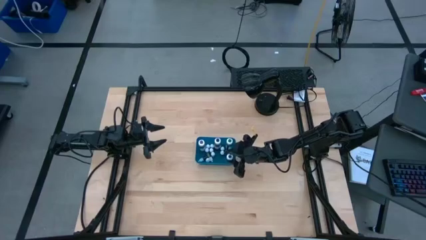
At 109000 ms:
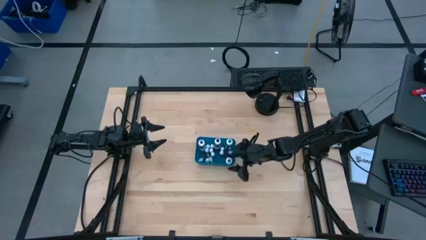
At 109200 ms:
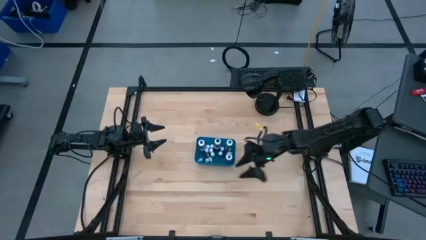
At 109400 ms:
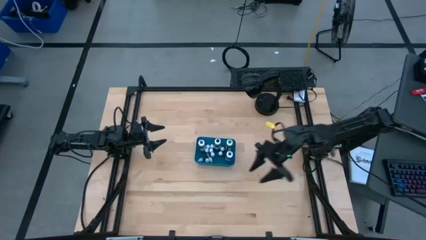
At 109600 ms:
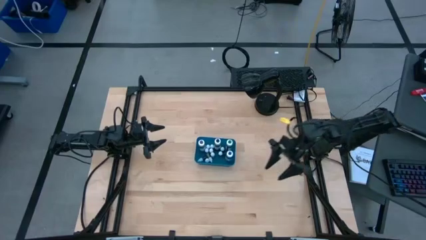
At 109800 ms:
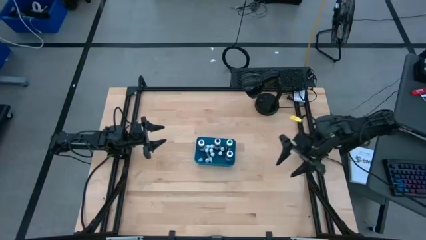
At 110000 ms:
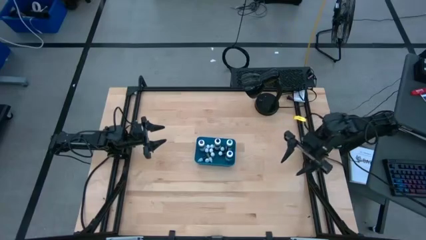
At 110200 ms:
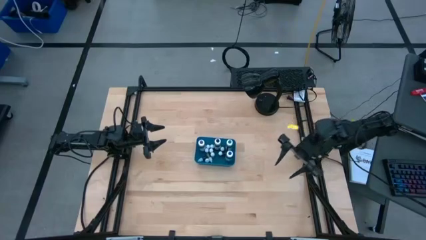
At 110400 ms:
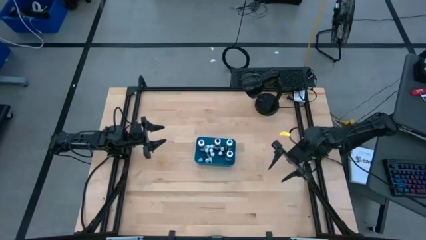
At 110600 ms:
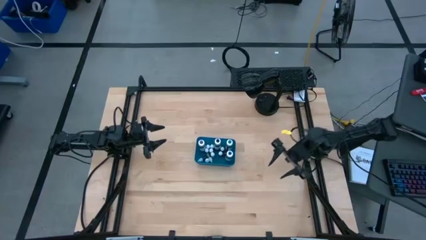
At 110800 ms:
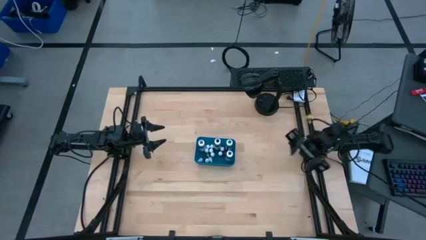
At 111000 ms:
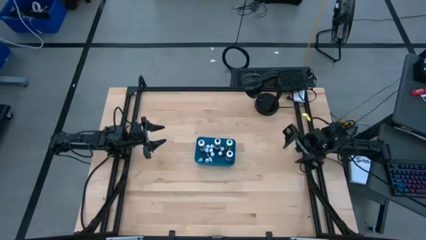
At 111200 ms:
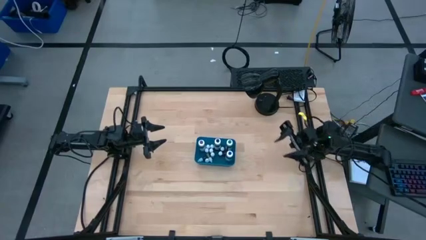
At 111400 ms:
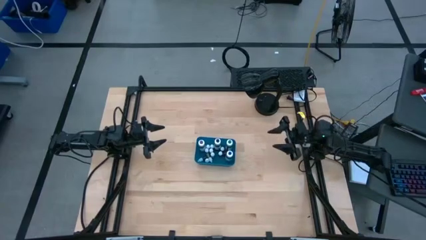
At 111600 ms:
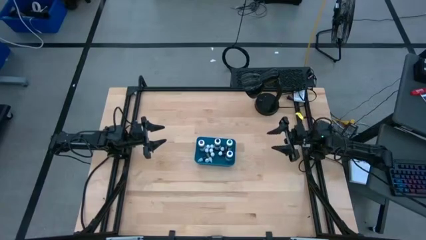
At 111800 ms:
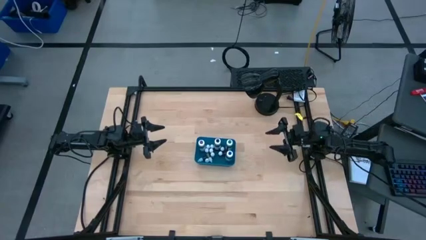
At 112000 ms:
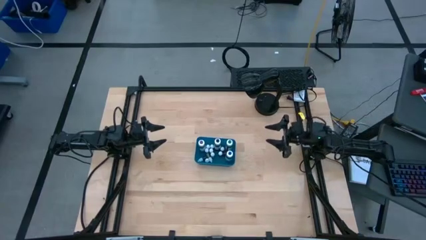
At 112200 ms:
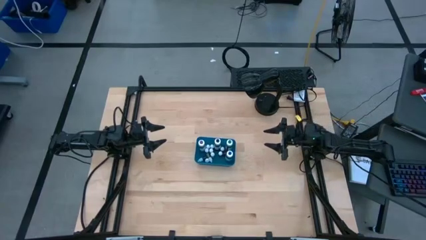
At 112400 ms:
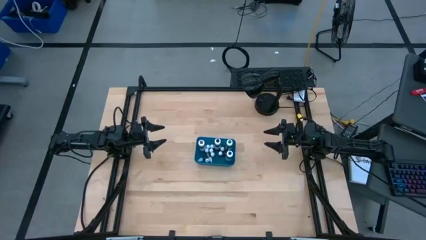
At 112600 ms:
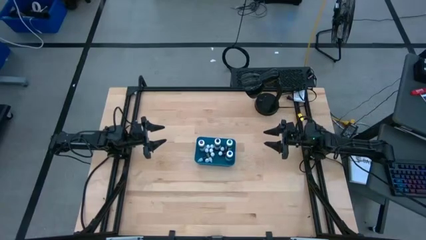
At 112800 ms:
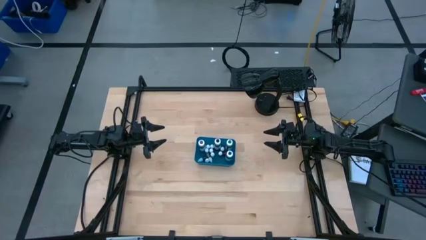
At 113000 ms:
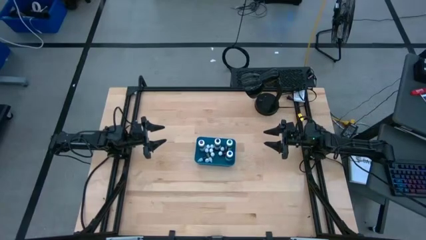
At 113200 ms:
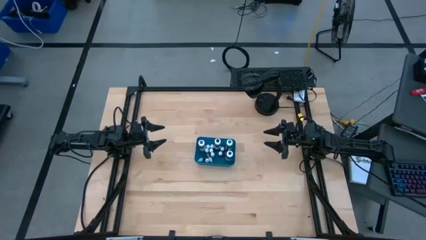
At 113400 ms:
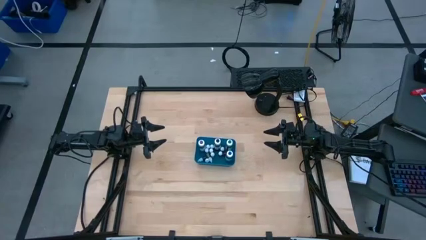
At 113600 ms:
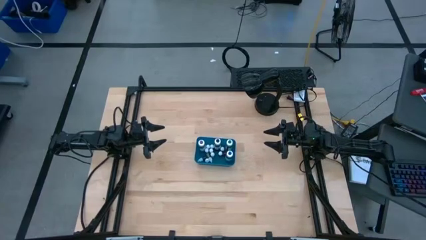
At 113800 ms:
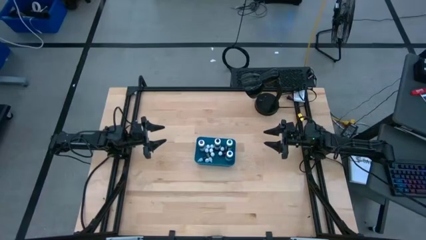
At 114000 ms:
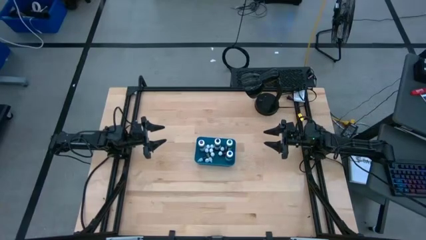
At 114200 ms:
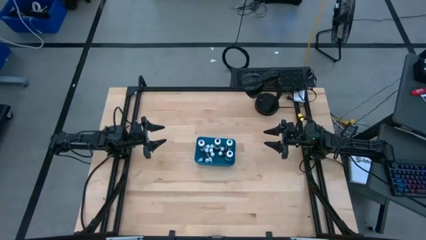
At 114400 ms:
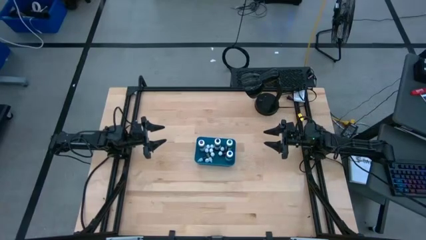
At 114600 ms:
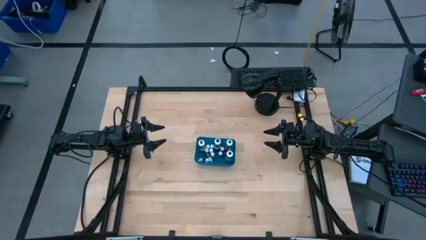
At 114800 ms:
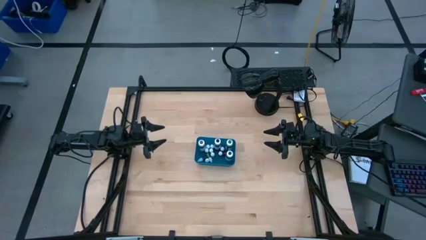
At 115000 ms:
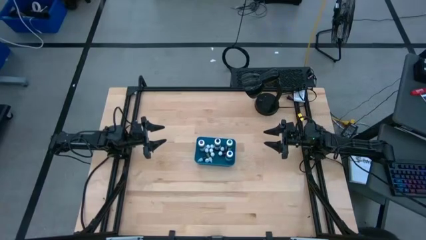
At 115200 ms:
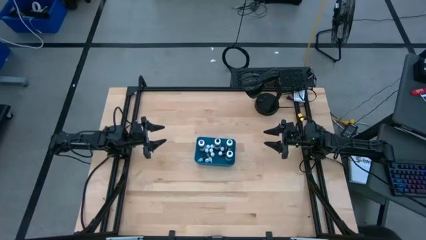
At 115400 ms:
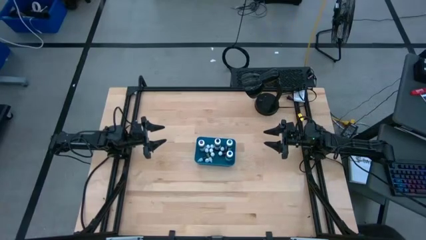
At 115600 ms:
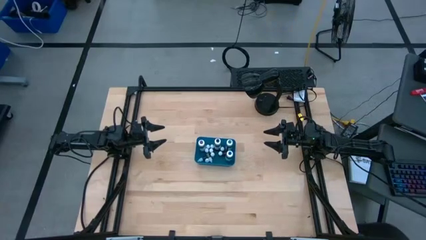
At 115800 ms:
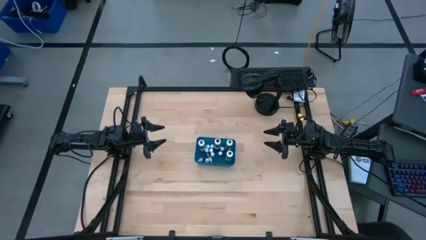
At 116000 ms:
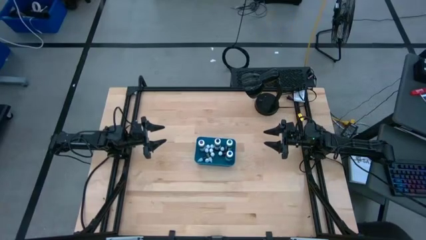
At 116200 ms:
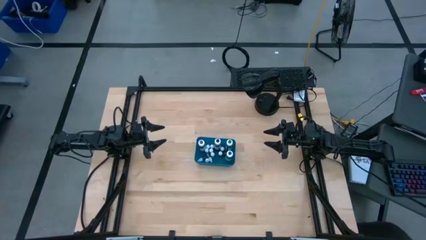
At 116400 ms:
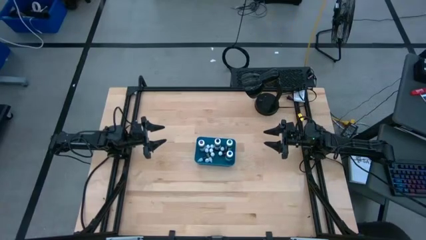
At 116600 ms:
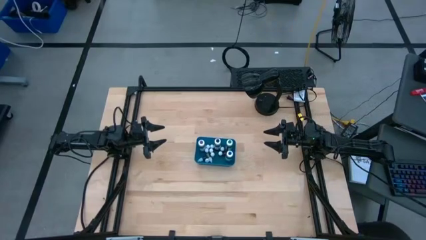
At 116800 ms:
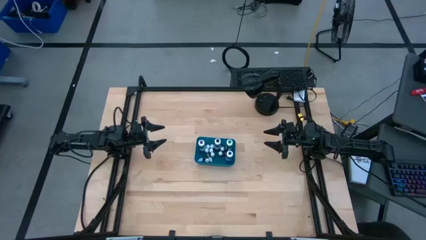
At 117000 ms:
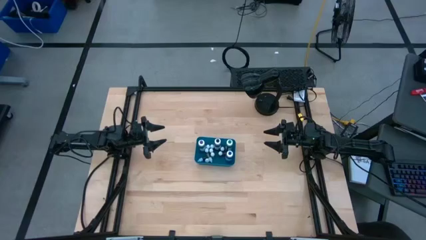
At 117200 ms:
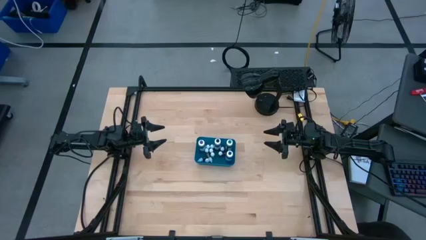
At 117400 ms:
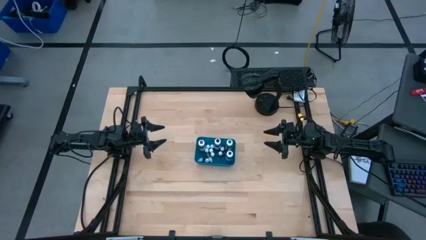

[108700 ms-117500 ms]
Task: Pick & Place food coloring
Return to Home Position

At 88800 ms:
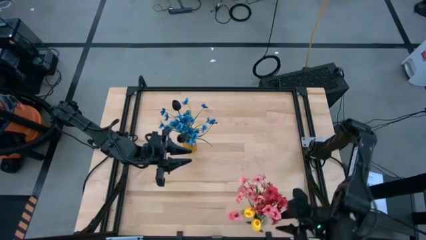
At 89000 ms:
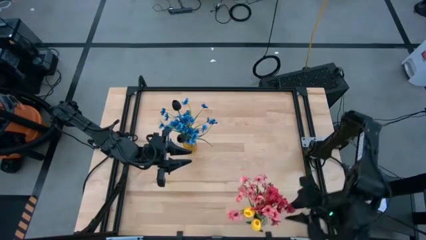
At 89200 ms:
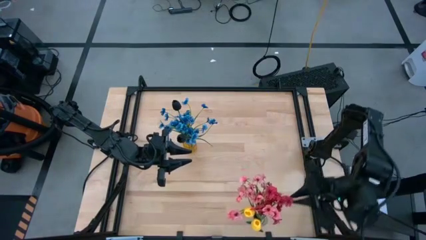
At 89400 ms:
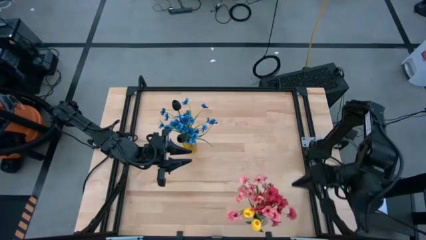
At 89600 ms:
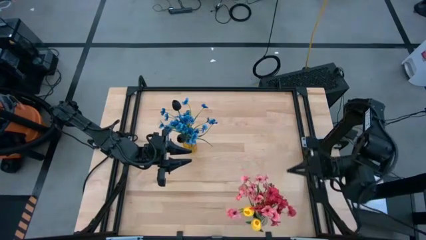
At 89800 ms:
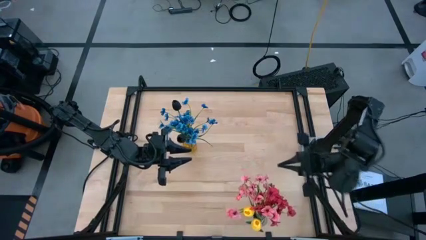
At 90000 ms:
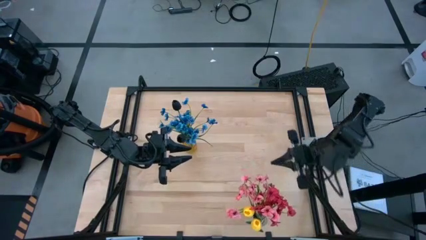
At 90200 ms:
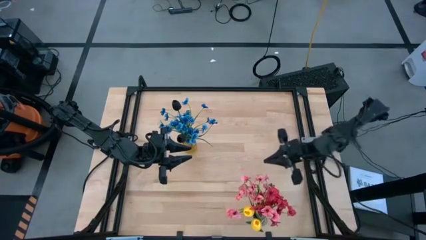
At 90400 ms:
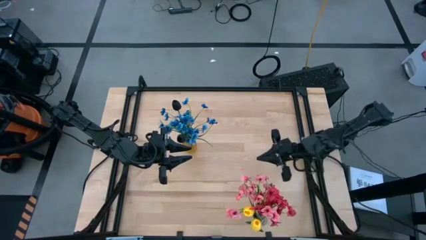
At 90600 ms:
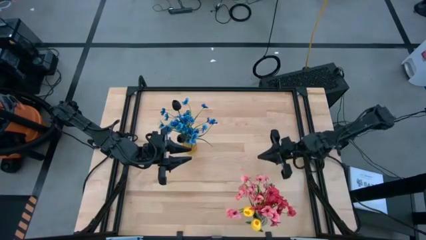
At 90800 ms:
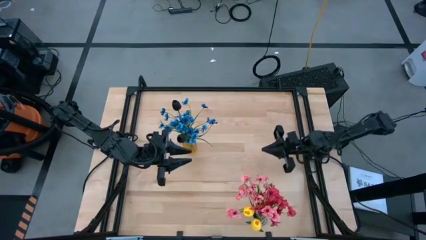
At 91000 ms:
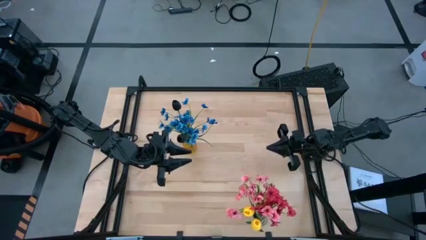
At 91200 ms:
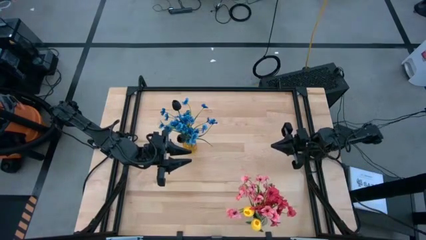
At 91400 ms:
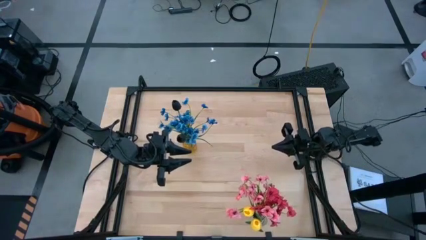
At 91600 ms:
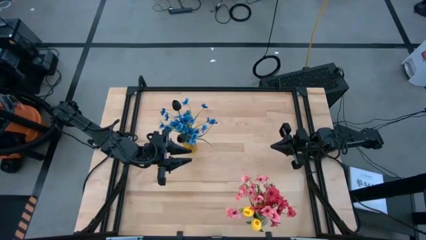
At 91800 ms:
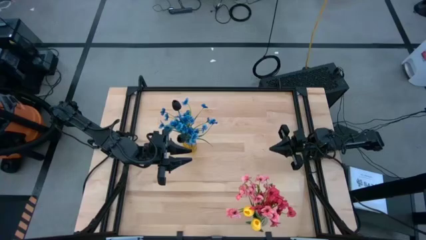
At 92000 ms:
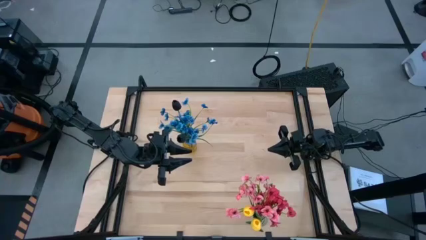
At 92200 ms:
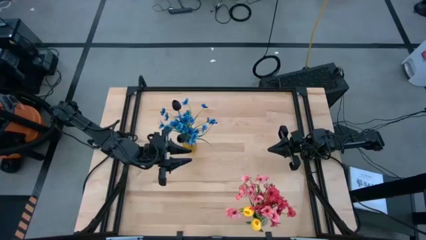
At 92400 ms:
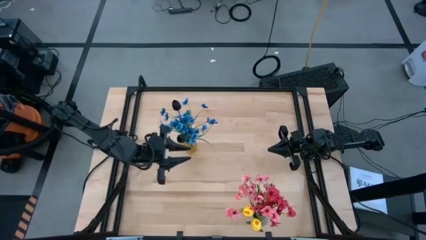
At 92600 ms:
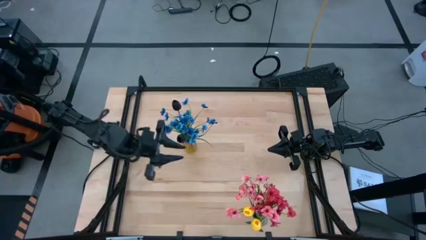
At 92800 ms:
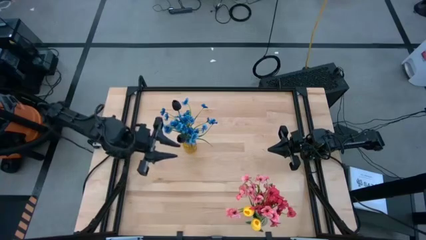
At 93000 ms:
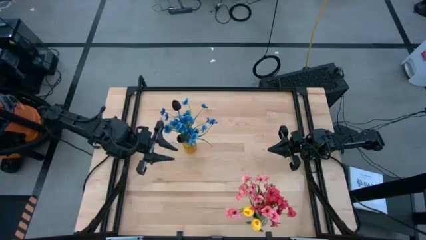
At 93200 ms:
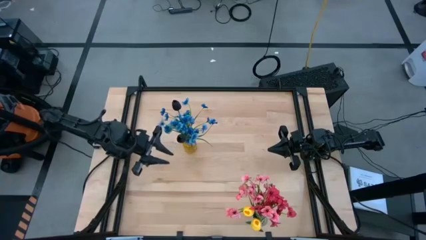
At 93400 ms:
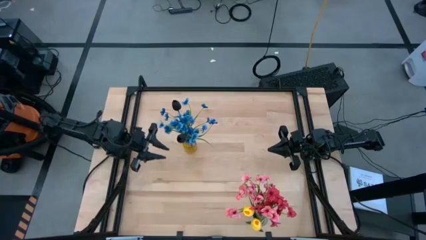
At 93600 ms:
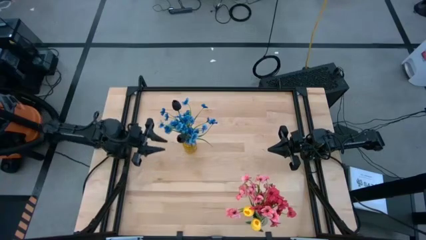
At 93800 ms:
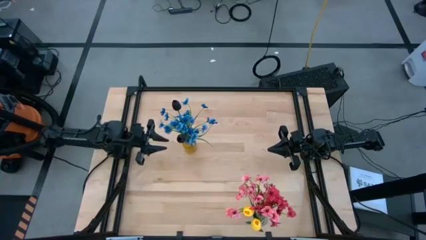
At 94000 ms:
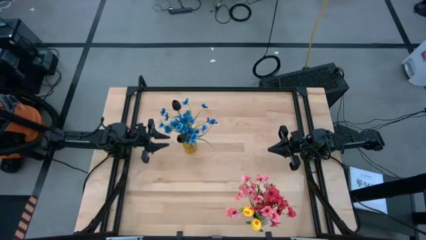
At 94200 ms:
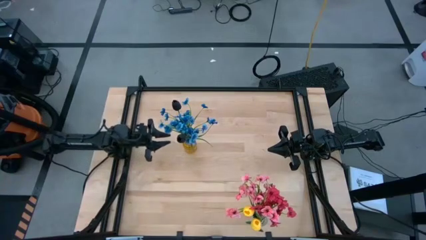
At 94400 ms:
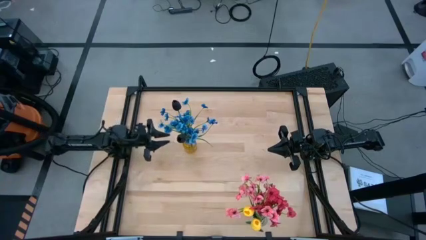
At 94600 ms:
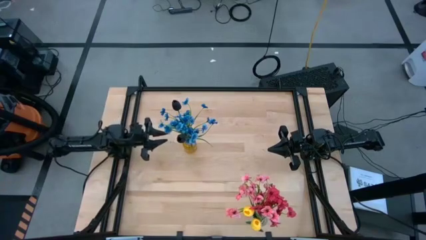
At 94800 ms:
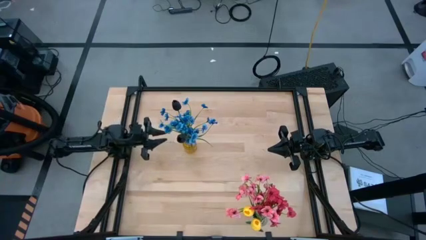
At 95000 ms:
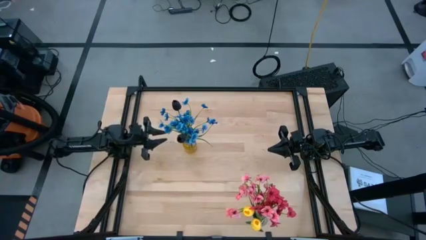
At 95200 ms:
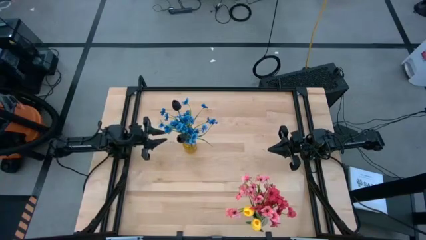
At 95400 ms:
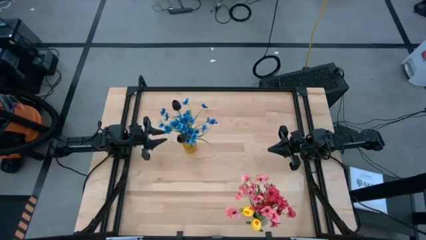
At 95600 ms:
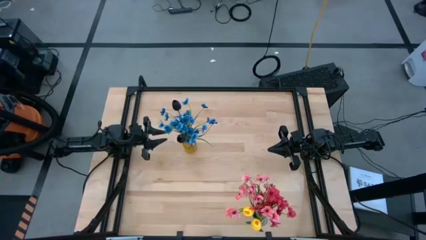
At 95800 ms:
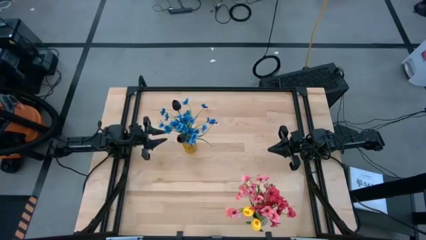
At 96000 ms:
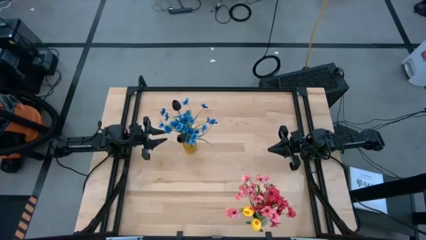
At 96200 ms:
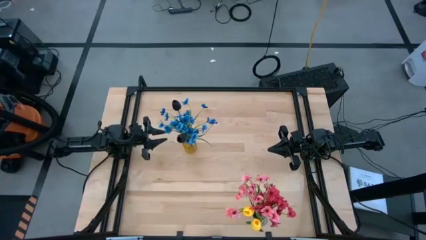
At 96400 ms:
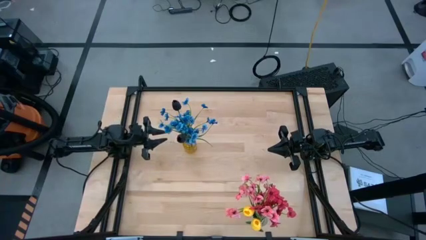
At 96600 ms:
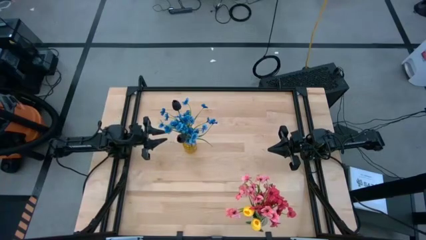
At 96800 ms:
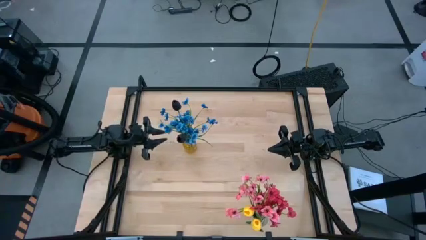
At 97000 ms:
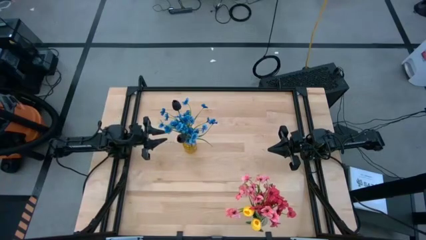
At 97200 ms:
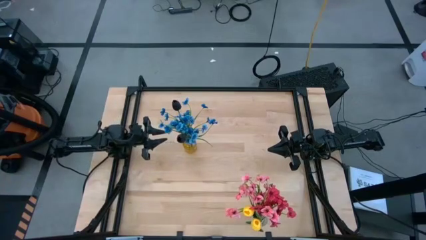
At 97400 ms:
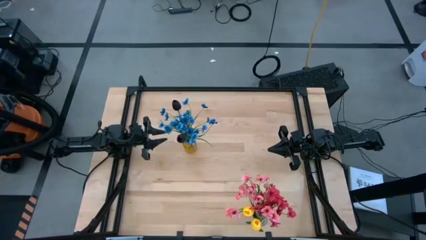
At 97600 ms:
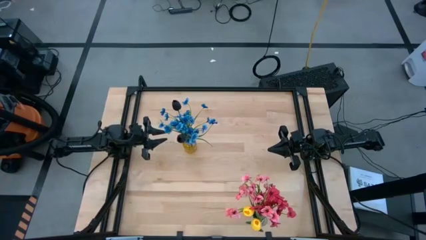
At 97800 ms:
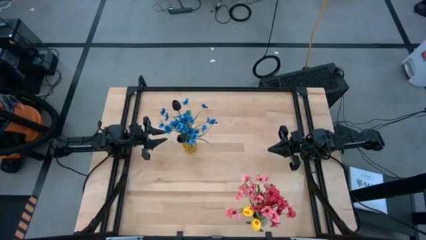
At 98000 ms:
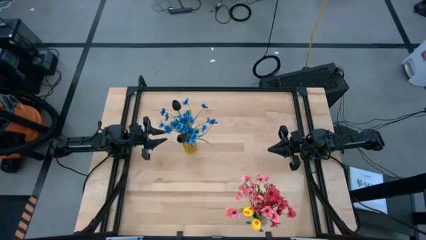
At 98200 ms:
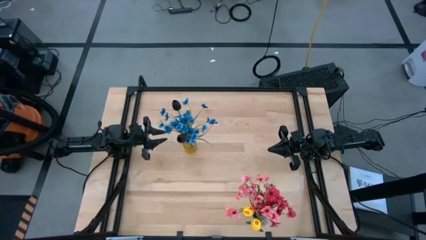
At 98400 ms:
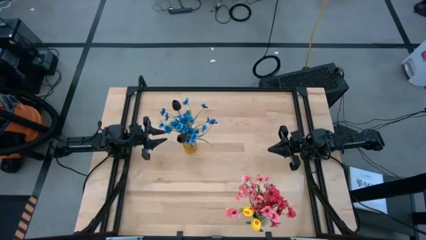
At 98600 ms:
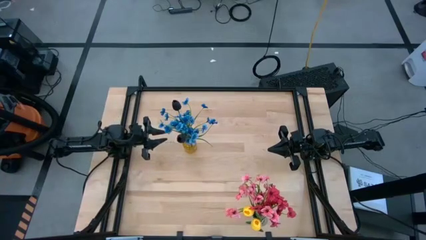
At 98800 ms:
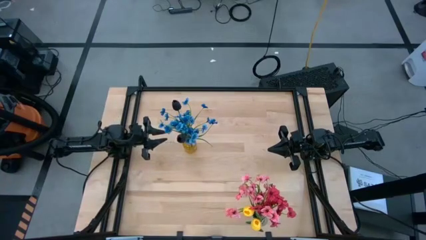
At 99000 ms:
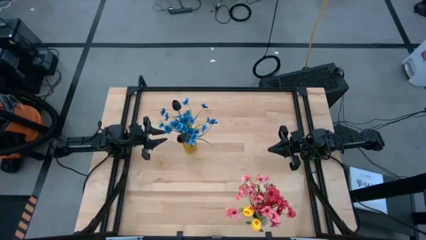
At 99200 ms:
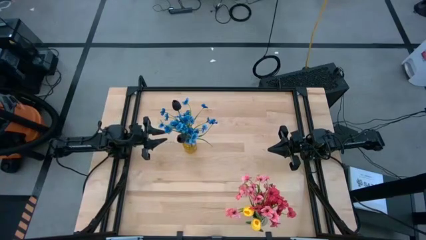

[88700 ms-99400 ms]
Task: Sort flowers into vase by color
Return to Home Position
